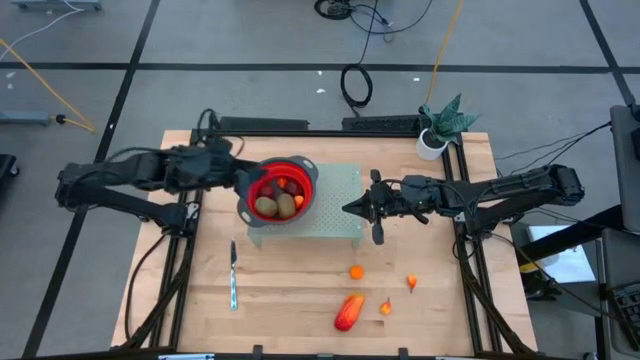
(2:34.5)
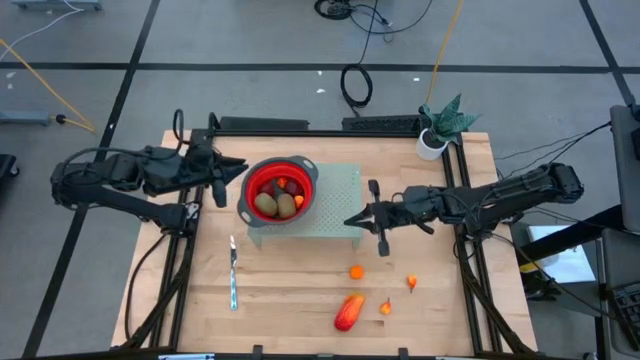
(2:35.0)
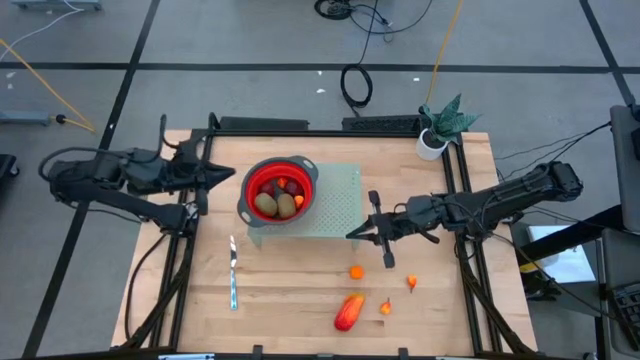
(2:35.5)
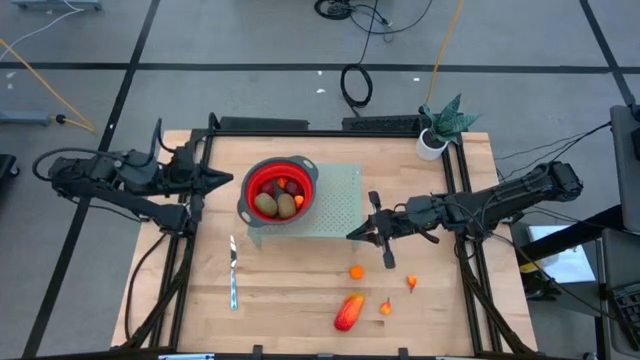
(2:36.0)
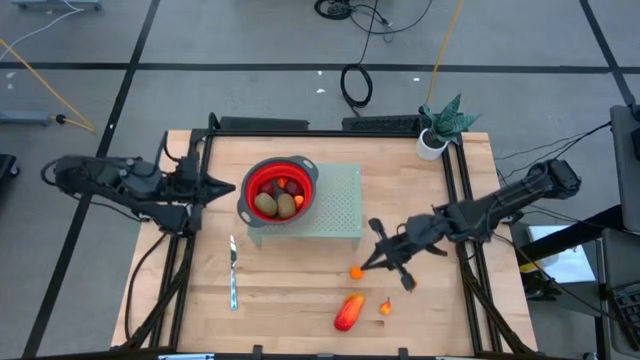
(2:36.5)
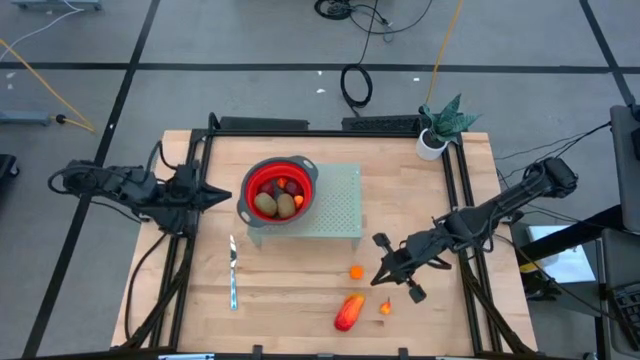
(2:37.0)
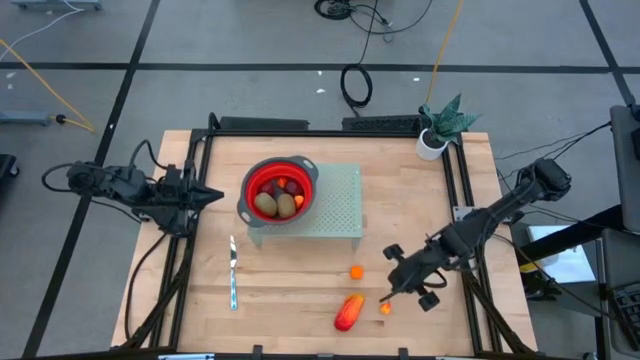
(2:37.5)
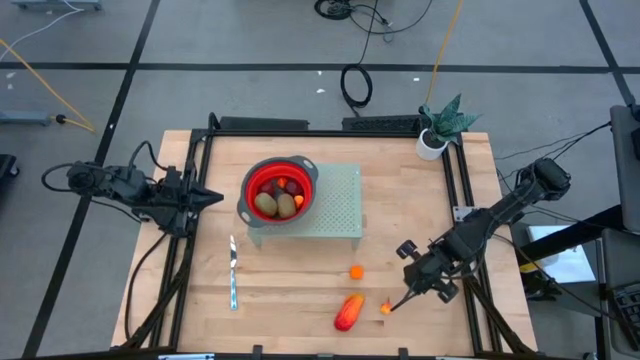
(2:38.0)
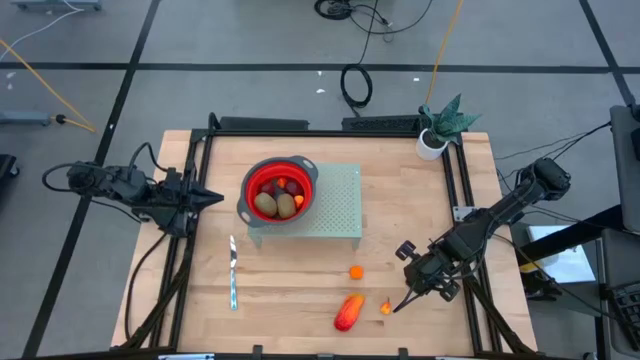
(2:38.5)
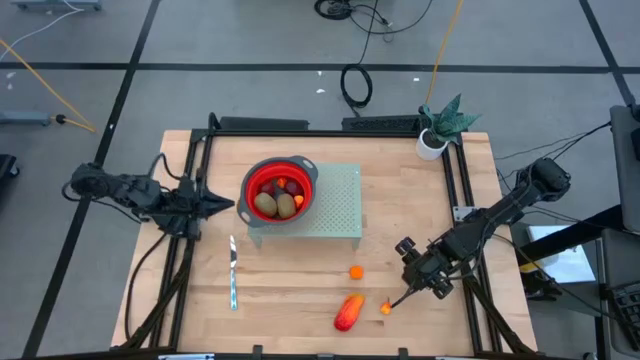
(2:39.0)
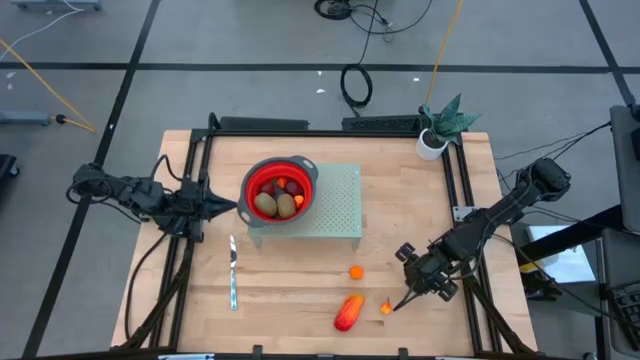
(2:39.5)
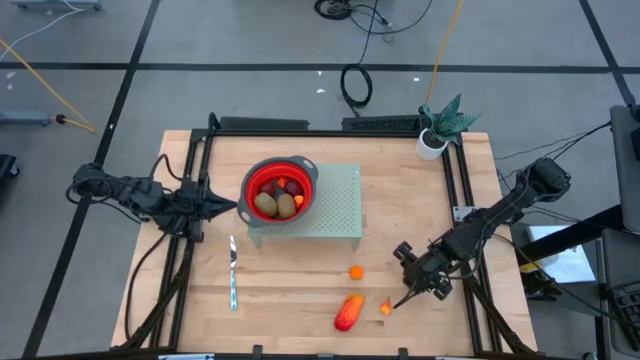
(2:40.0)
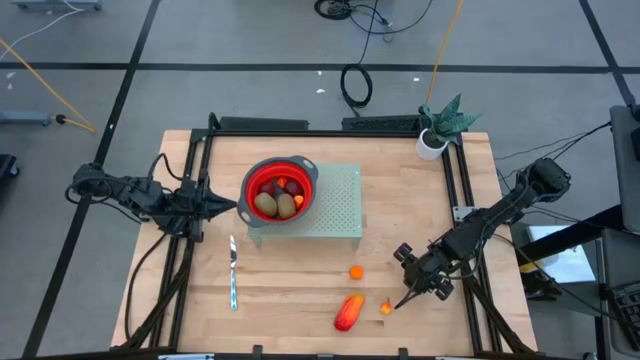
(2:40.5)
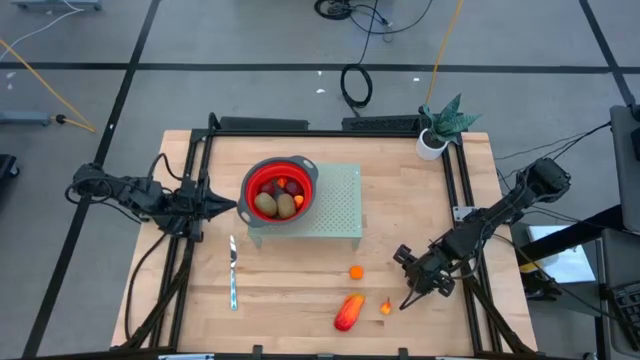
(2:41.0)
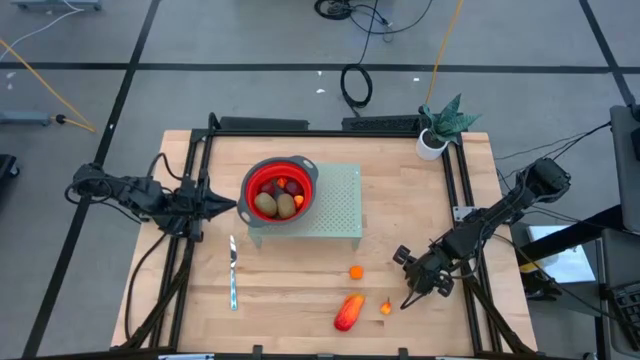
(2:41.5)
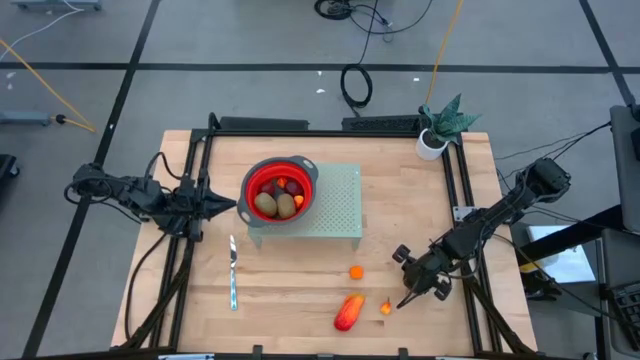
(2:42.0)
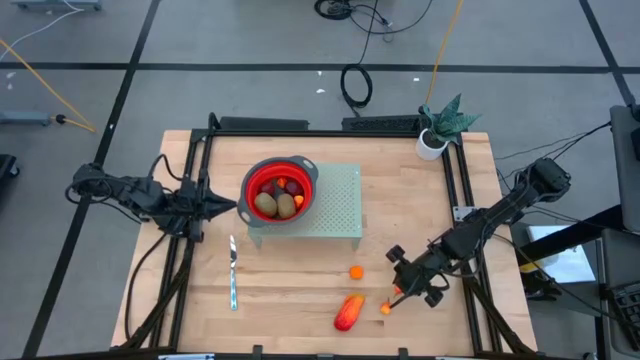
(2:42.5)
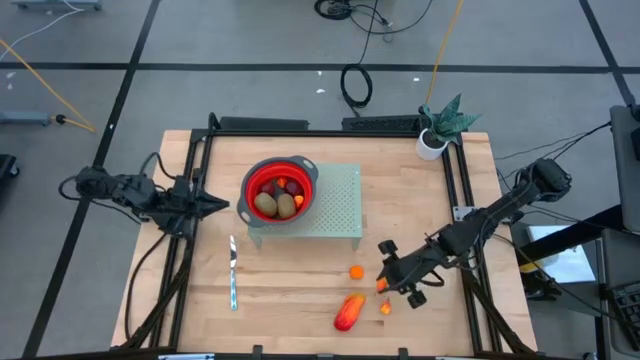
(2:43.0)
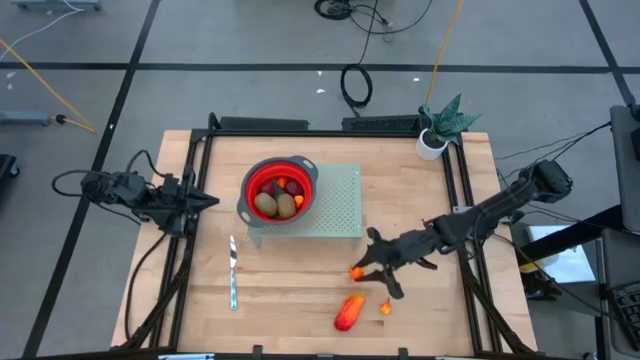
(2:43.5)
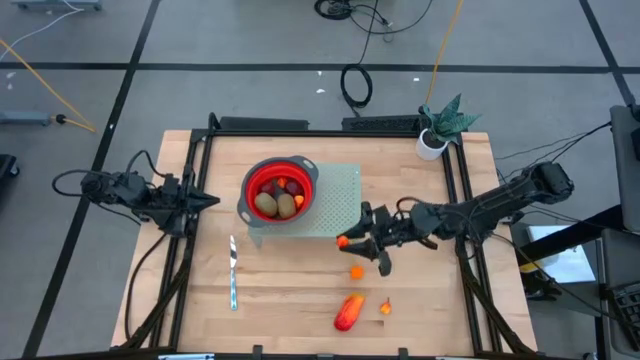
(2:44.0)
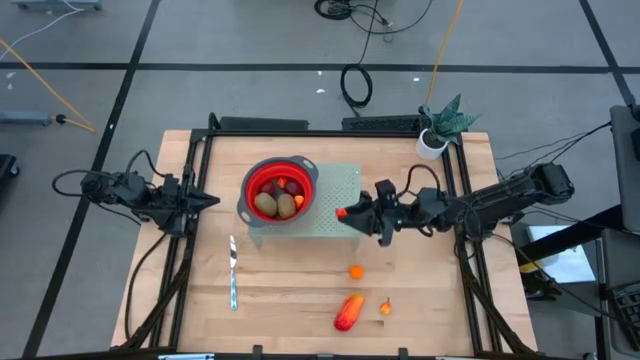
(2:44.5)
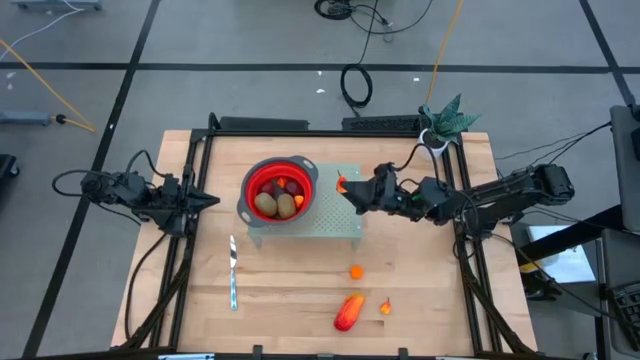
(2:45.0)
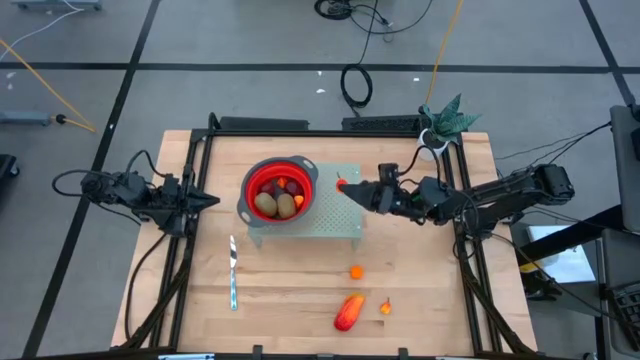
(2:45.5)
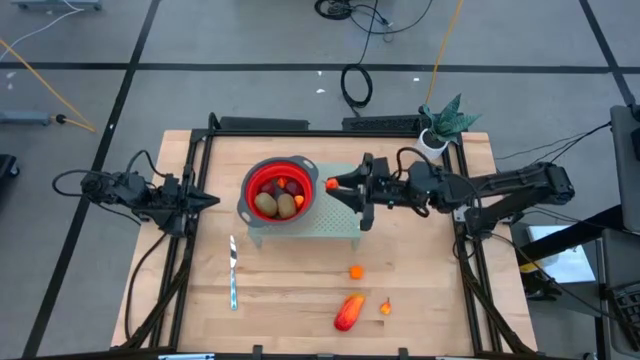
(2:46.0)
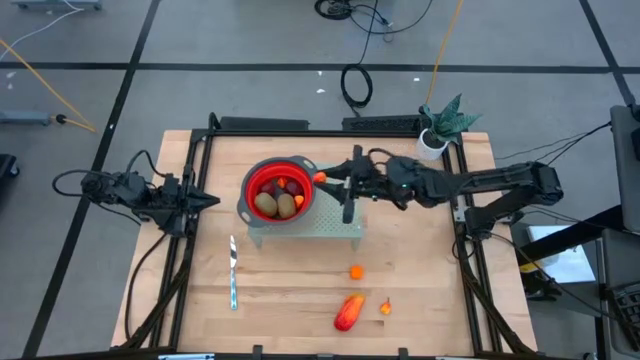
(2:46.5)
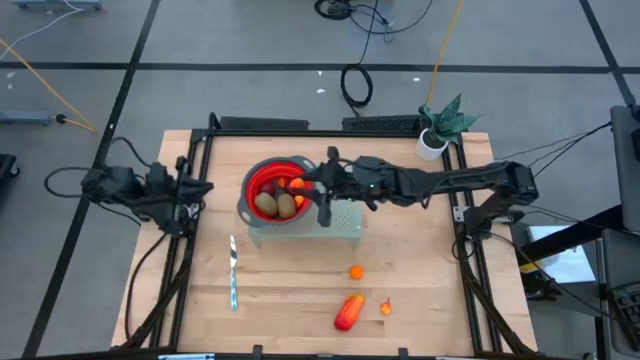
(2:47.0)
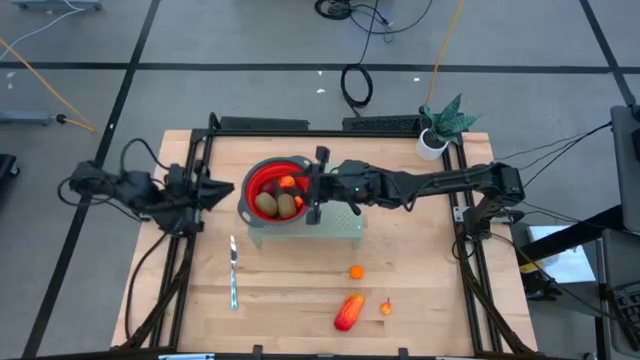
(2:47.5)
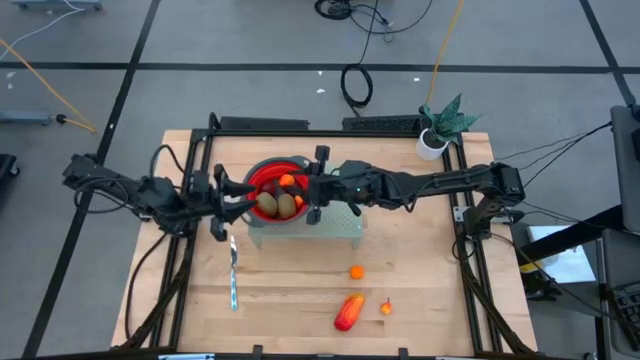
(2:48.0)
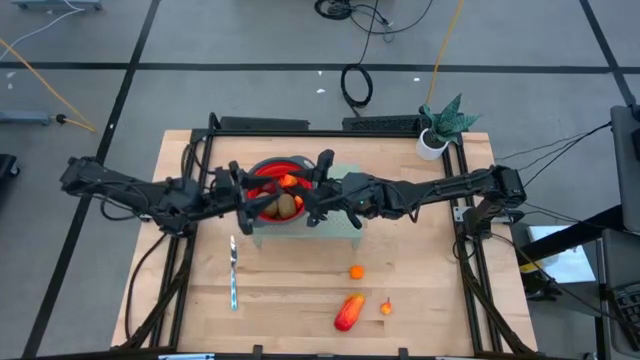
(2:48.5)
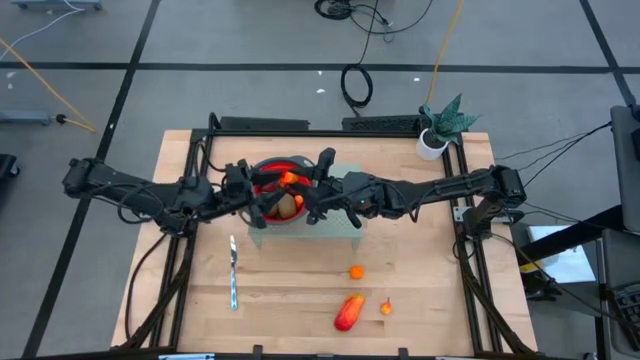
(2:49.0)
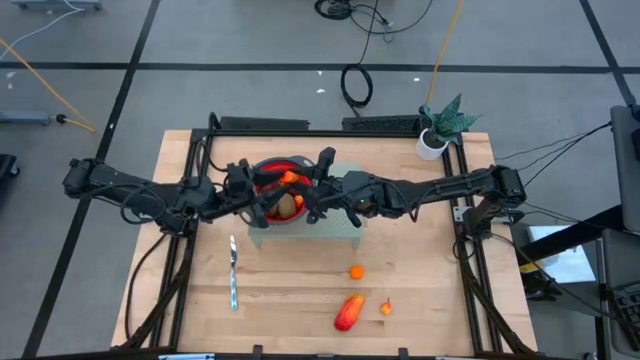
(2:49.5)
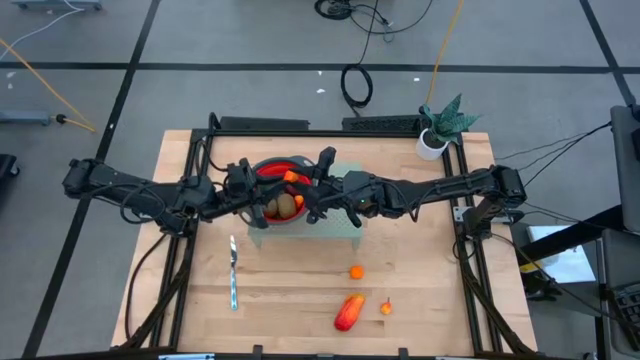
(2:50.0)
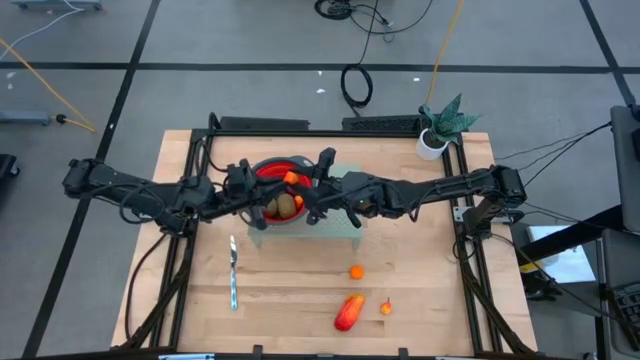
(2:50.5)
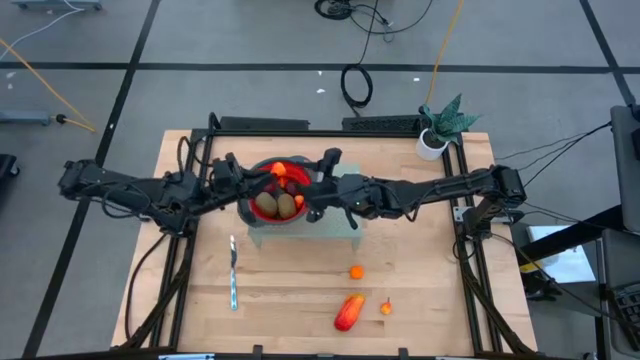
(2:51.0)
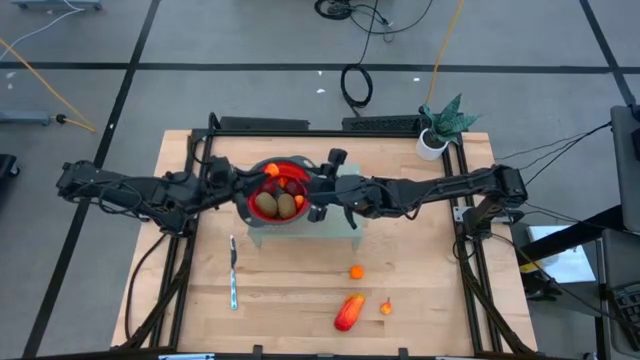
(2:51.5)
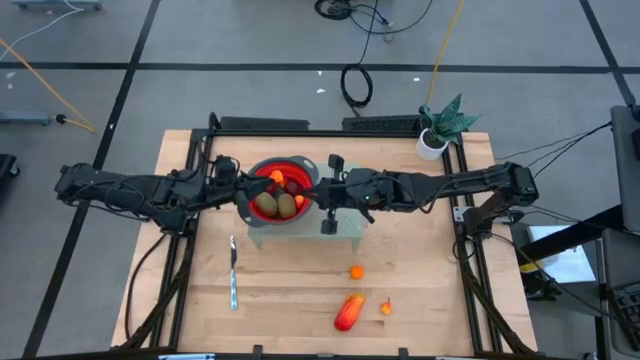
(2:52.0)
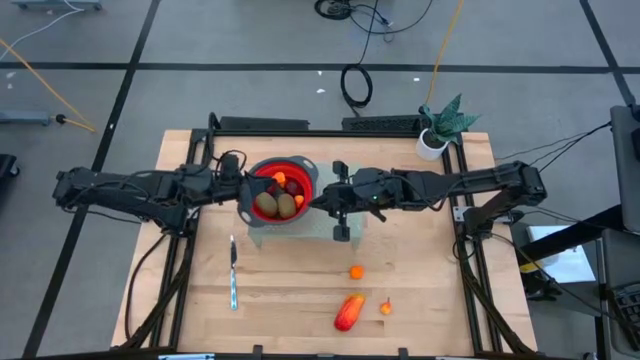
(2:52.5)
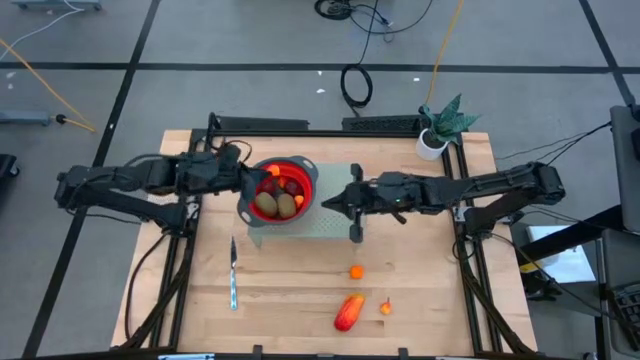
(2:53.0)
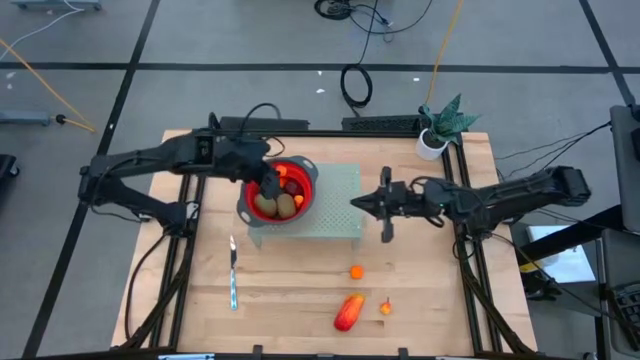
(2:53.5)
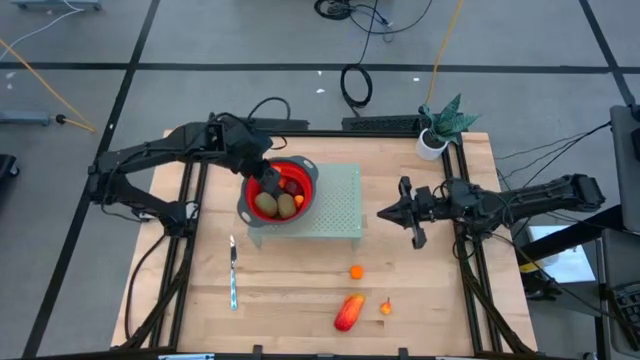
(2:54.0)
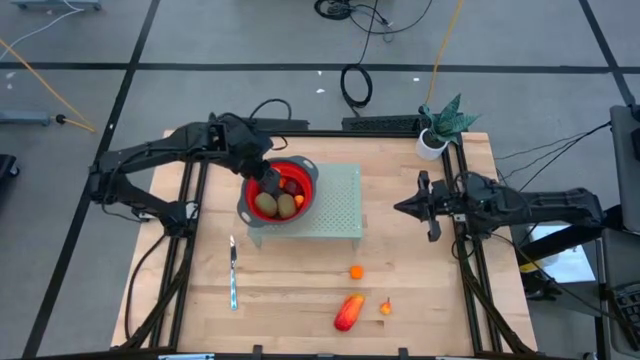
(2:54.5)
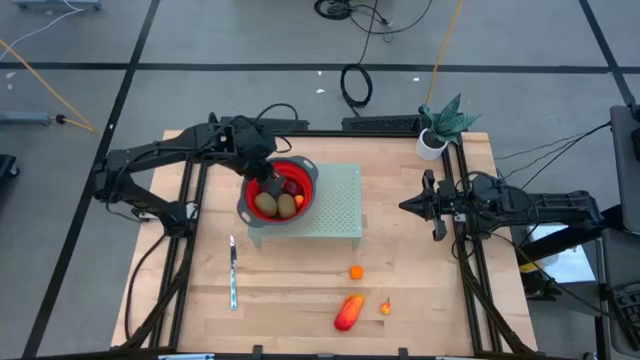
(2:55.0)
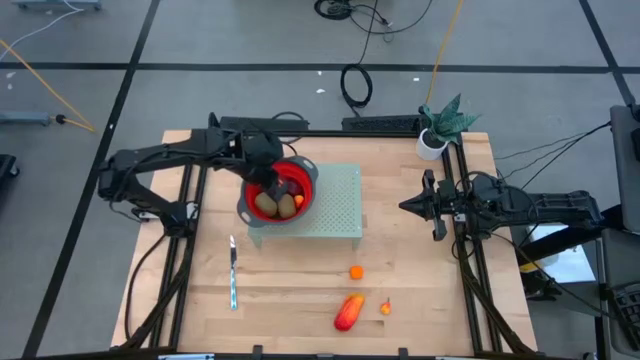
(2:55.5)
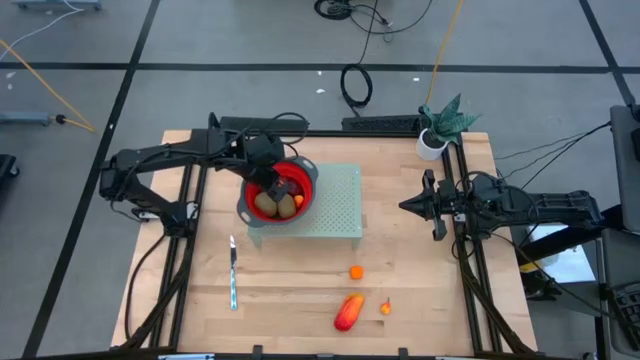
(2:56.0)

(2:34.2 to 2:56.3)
Task: Pick & Place Fruit
Put the right peach into the strainer bowl on the shelf
